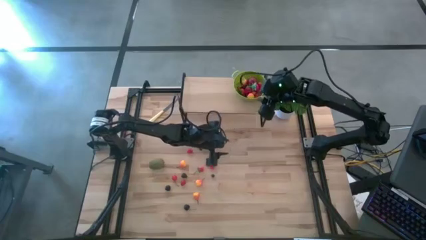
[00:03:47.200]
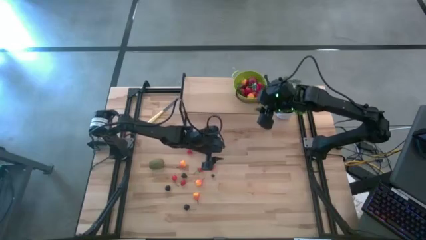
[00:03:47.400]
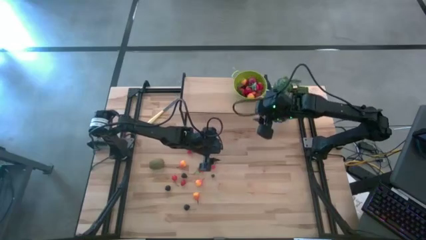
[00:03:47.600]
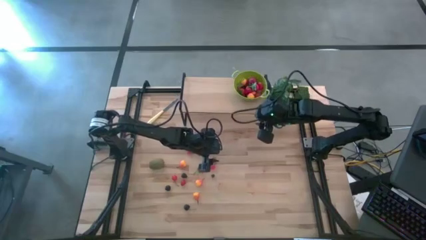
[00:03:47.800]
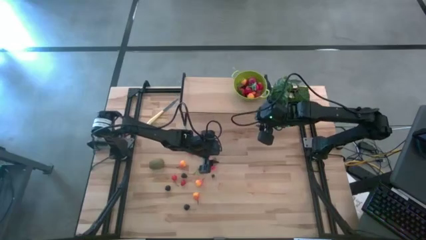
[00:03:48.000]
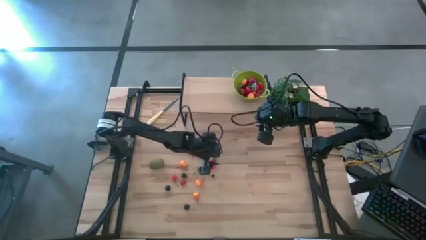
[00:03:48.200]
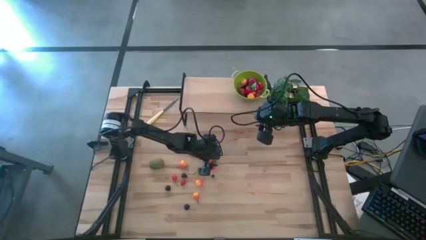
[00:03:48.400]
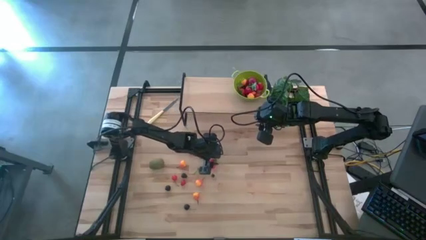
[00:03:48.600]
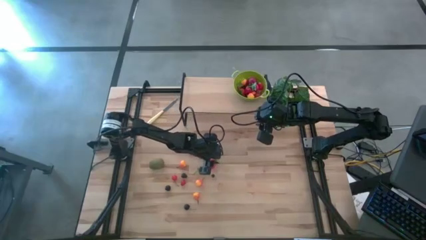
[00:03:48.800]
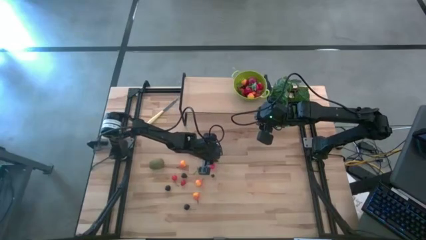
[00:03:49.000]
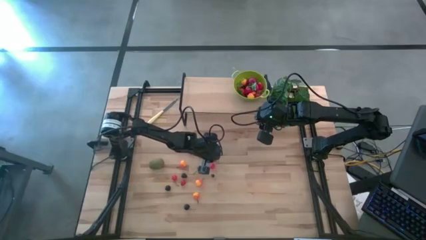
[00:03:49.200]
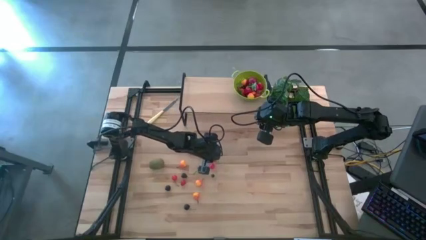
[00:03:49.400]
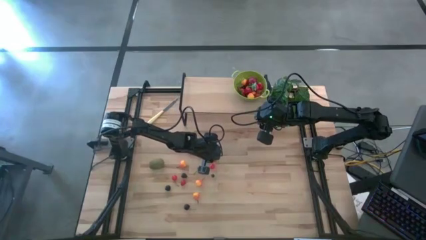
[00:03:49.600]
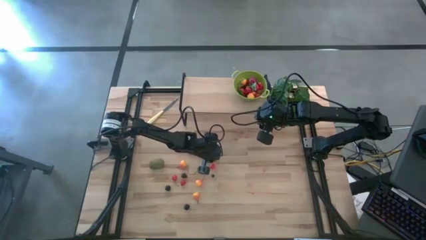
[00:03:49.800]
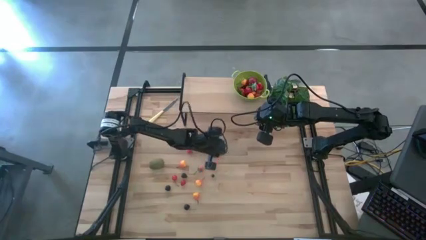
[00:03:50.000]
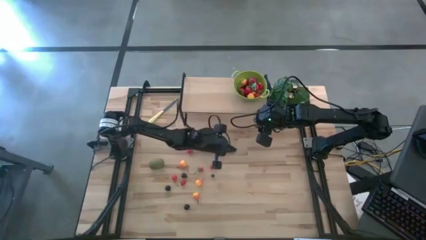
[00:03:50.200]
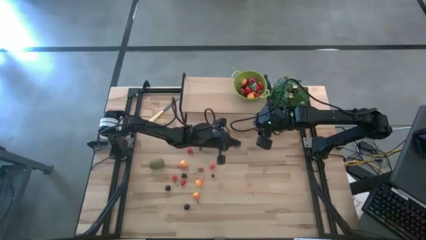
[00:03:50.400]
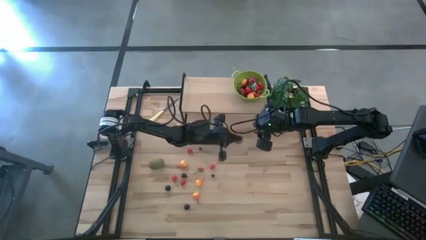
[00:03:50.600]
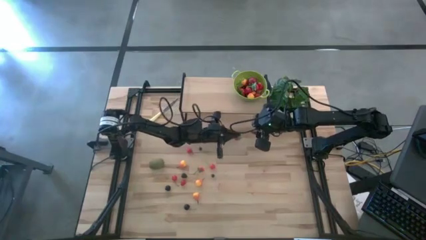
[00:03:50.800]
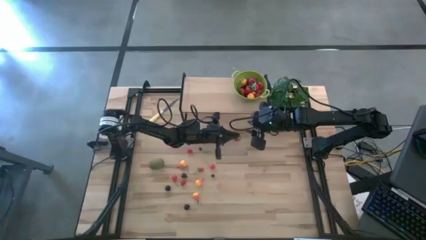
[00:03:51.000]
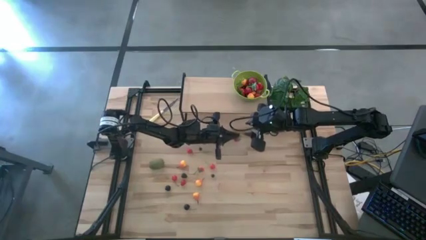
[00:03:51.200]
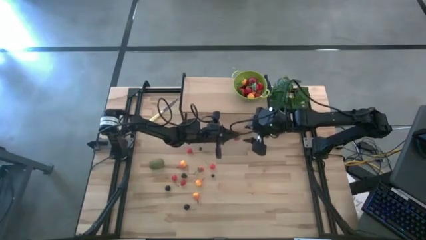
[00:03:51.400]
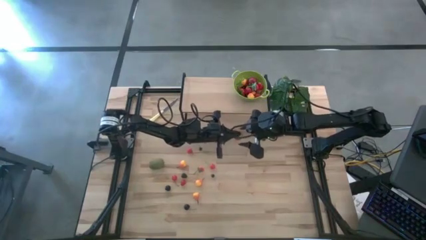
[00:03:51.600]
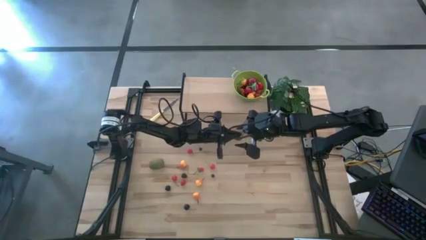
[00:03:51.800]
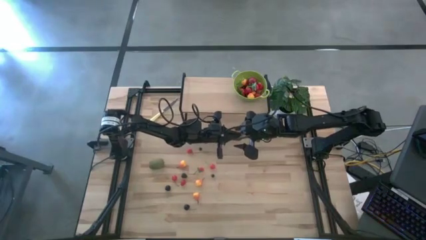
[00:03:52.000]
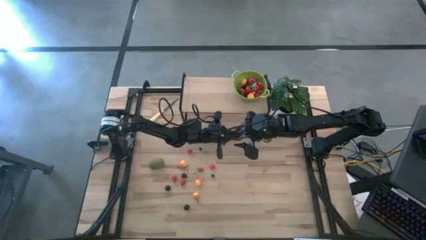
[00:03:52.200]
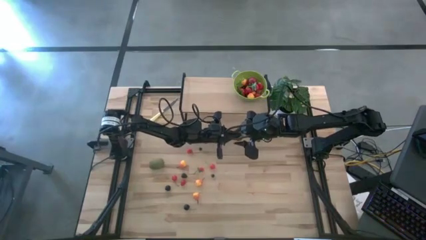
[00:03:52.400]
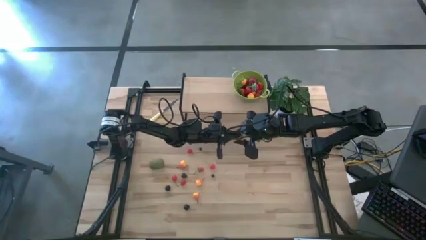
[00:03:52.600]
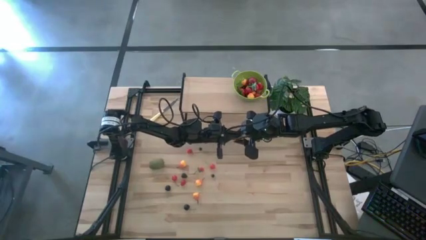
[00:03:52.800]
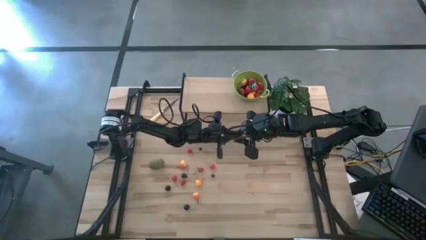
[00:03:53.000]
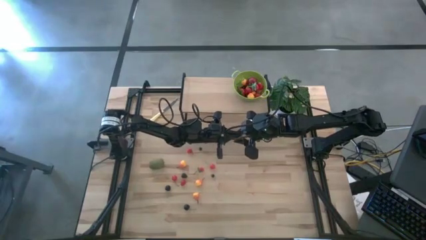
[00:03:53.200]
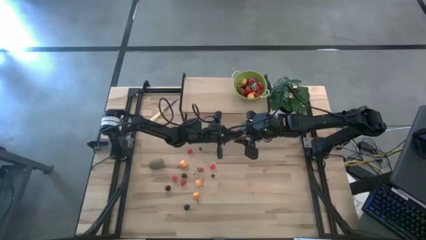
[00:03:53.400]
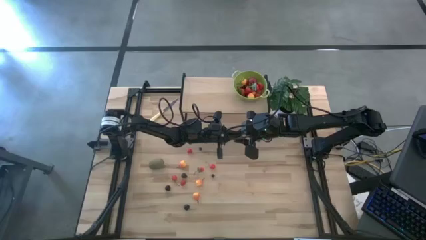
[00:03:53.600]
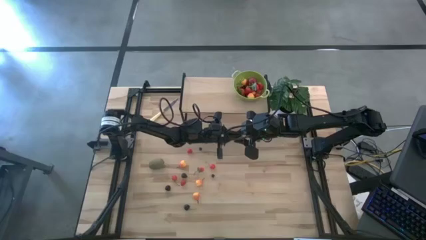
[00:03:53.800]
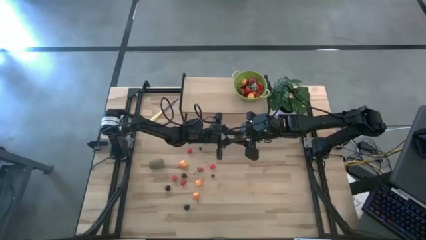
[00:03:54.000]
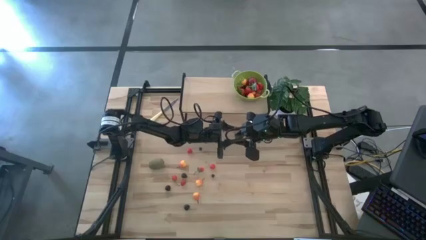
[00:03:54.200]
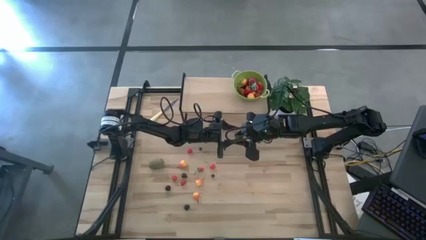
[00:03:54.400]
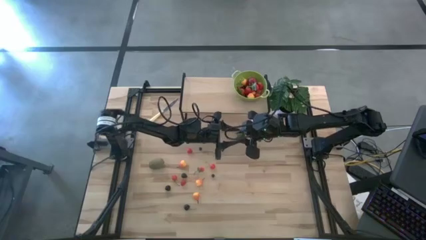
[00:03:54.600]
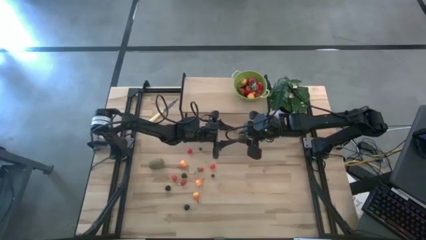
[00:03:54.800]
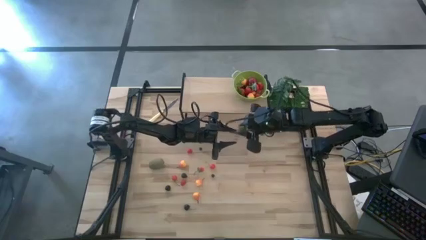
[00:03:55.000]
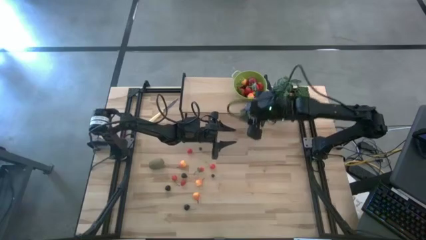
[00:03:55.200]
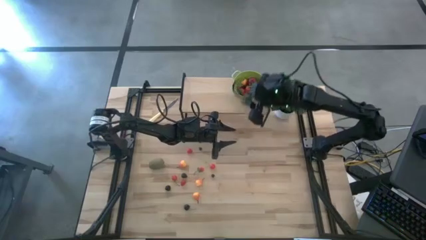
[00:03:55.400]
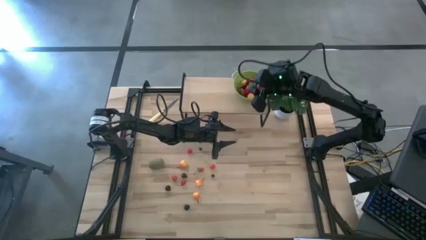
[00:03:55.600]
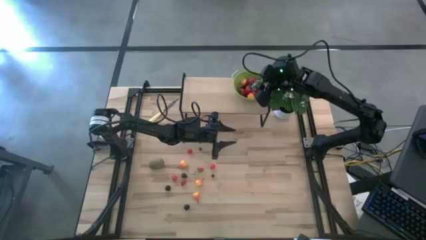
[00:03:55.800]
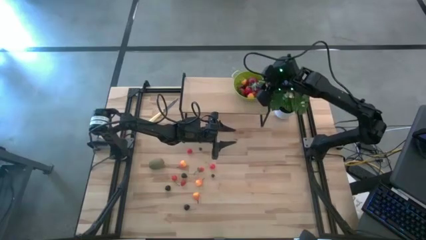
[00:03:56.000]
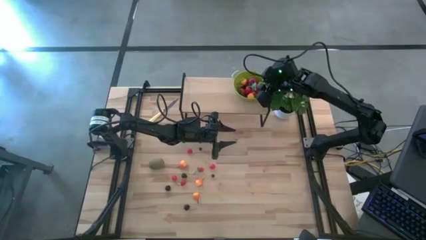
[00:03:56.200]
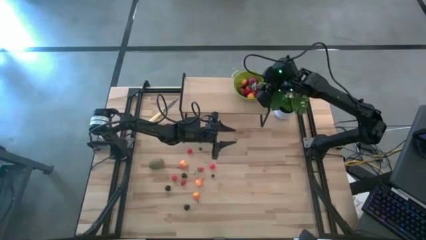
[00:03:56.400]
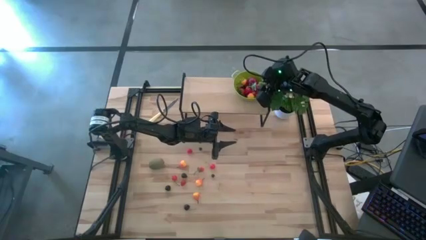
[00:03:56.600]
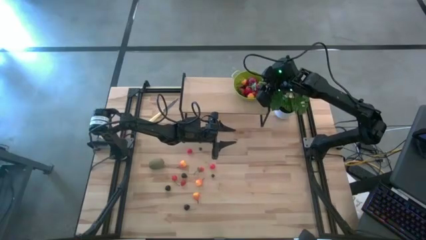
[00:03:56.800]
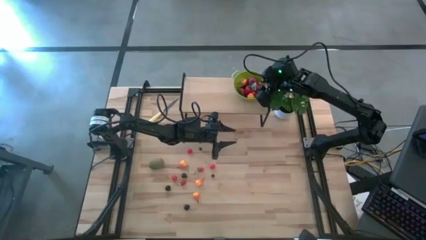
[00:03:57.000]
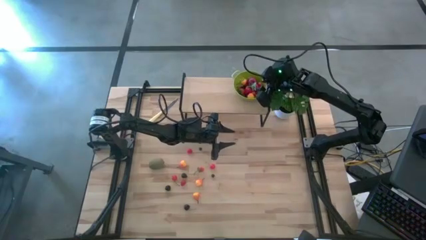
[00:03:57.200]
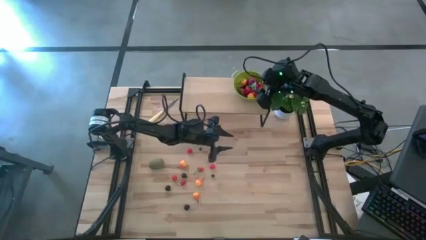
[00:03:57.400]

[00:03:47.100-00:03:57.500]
Task: Build produce basket
Put the strawberry into the green basket

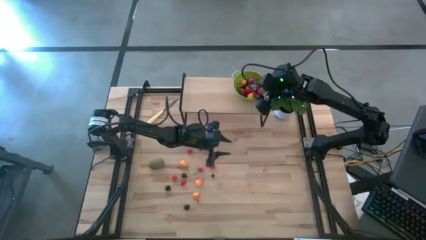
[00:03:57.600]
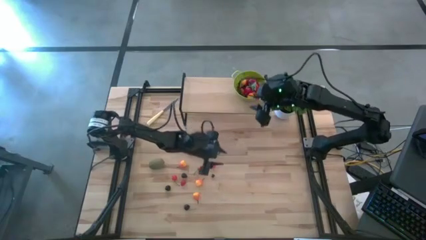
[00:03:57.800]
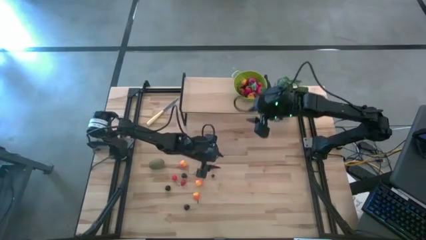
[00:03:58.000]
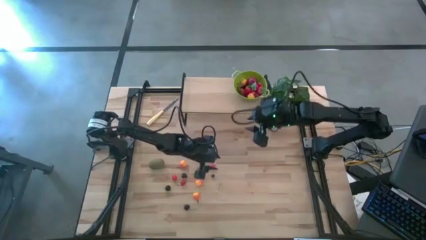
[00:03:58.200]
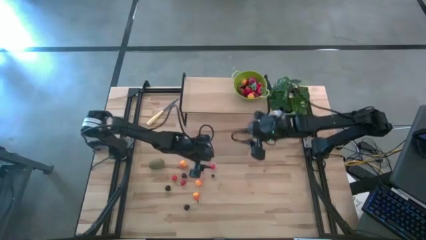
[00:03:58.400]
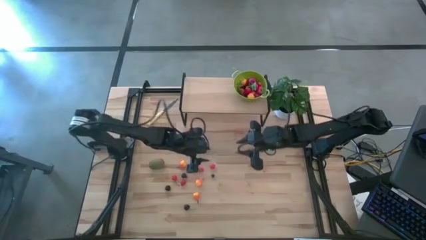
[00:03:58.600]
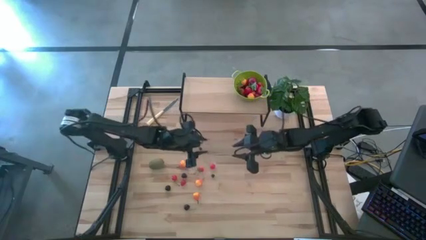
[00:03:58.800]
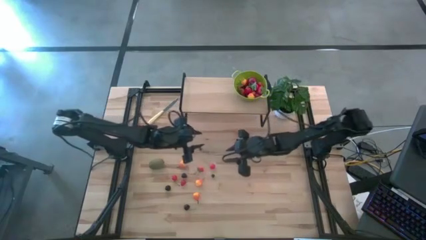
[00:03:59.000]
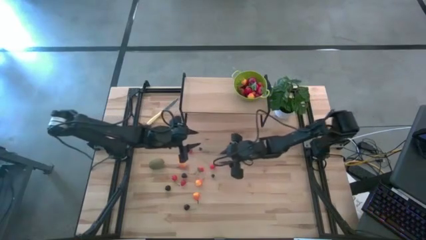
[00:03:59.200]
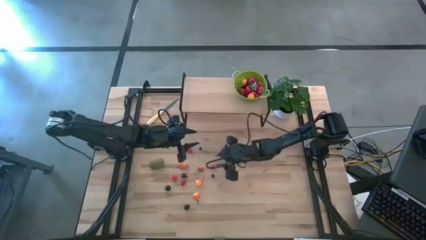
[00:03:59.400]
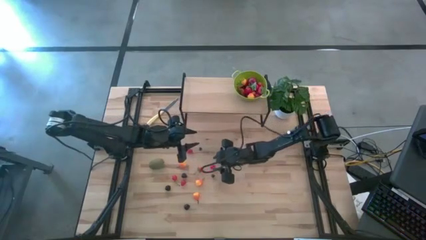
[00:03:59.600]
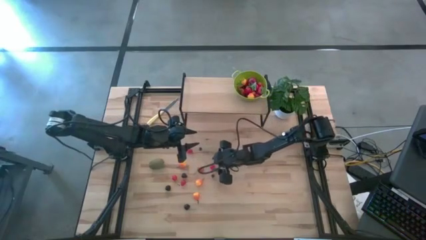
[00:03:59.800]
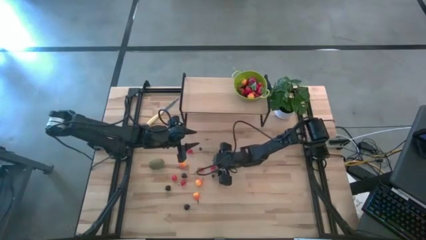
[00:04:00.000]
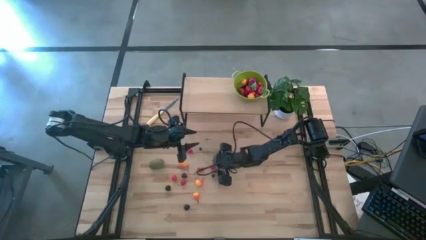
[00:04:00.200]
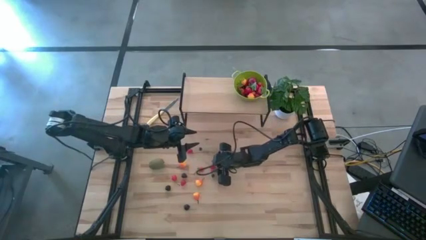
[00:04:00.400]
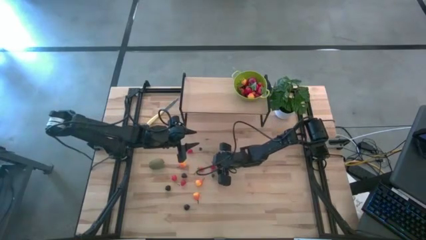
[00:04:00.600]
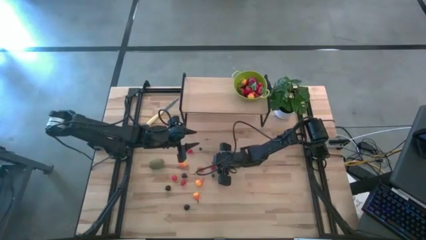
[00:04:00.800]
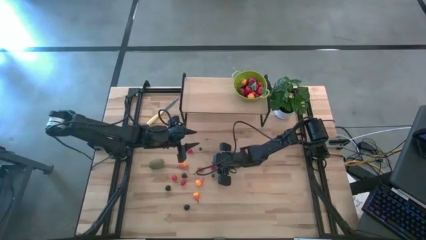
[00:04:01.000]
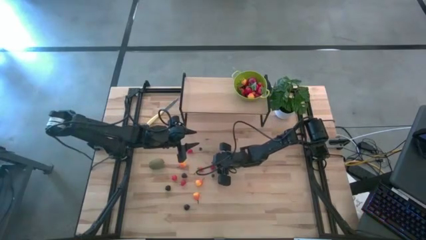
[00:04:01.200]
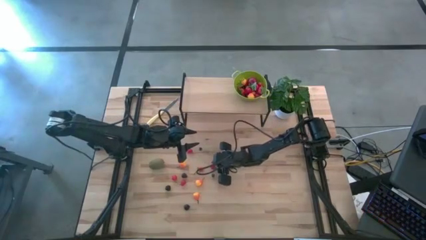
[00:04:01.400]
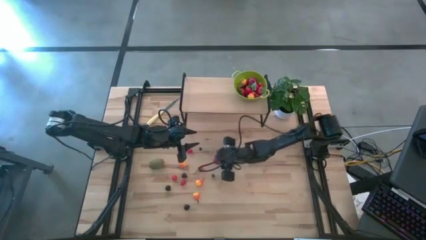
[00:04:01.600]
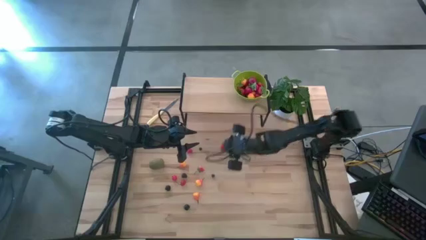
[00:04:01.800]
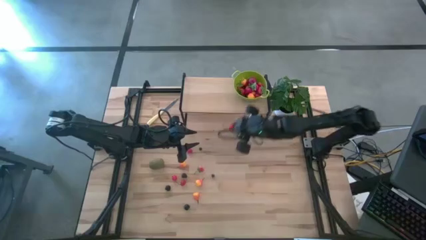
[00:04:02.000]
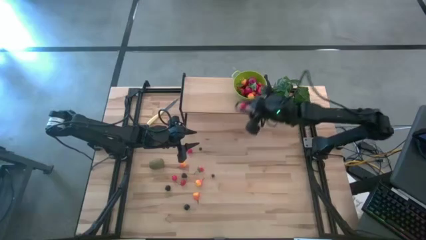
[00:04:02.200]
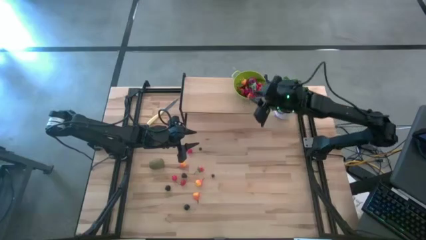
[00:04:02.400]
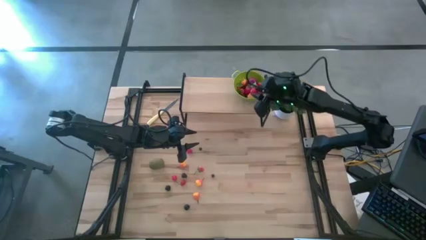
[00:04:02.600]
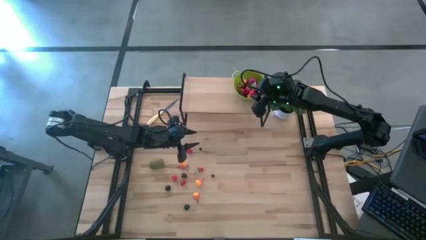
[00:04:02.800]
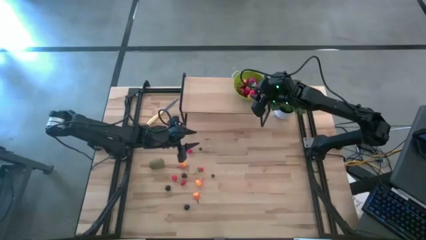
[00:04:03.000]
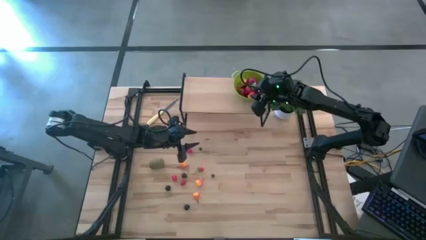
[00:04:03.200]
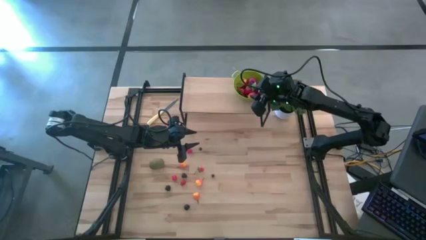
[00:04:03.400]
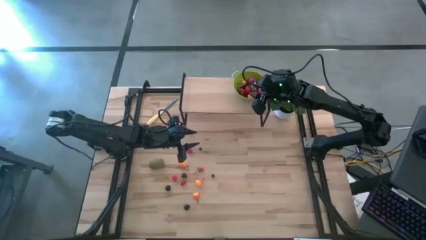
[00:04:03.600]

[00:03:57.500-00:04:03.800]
Put the red cherry into the green basket
